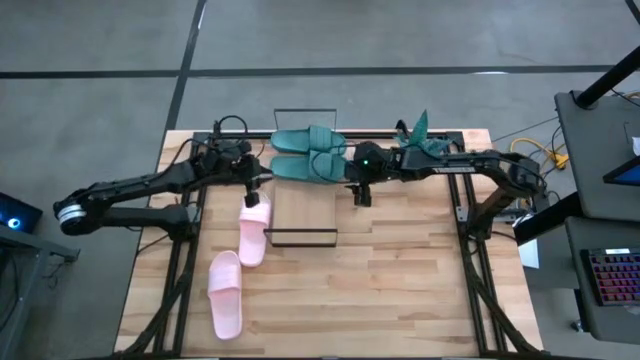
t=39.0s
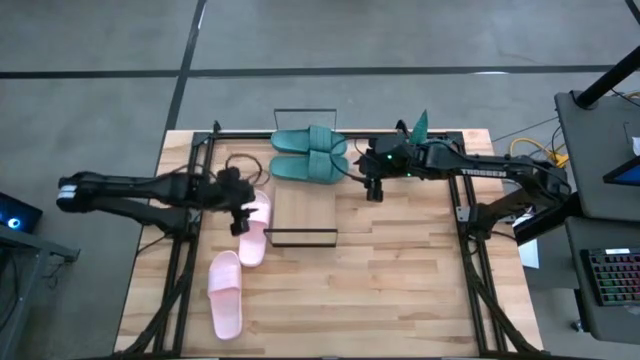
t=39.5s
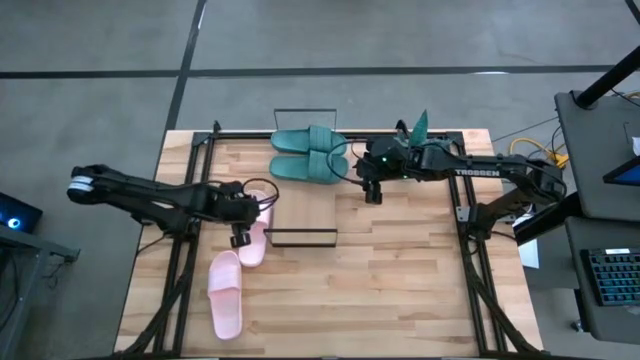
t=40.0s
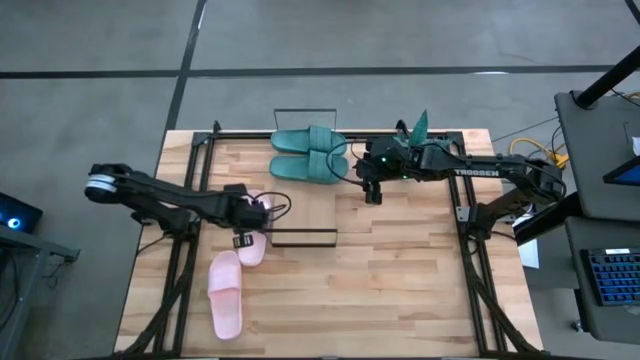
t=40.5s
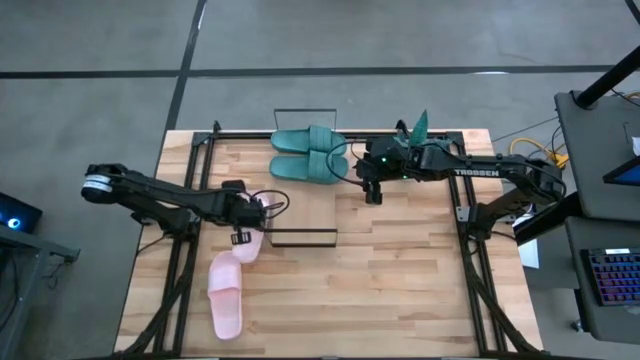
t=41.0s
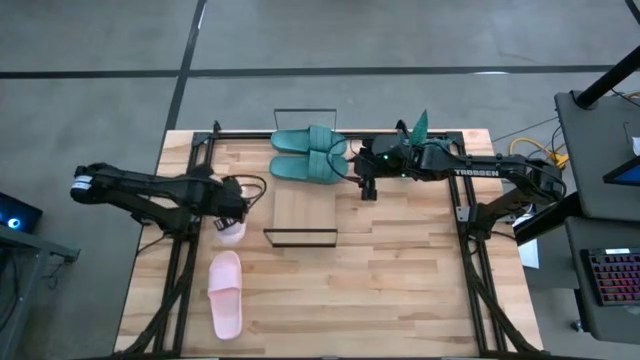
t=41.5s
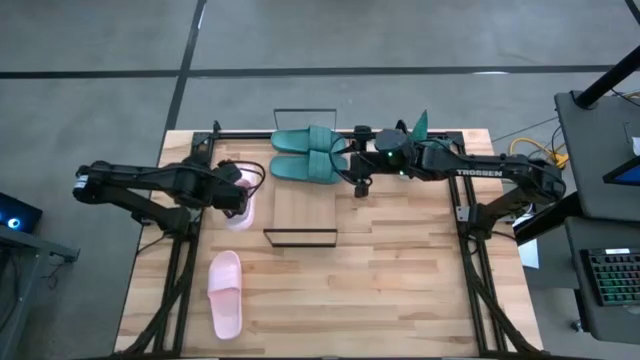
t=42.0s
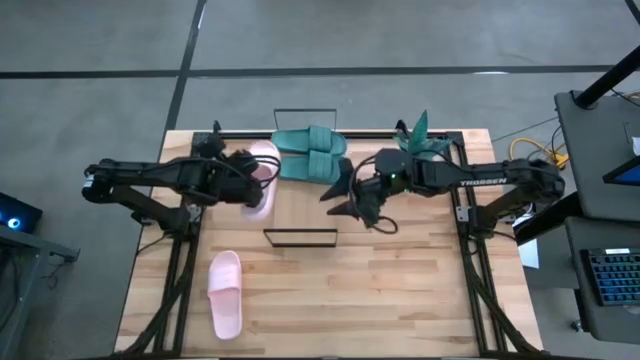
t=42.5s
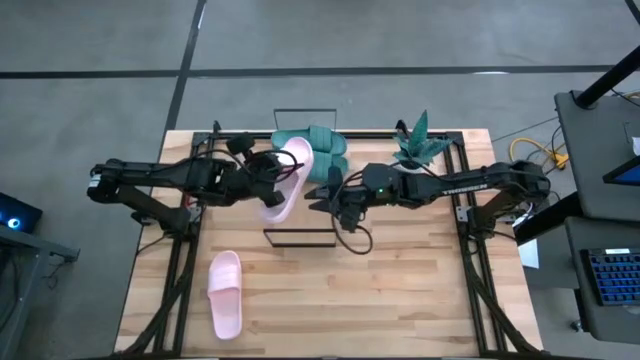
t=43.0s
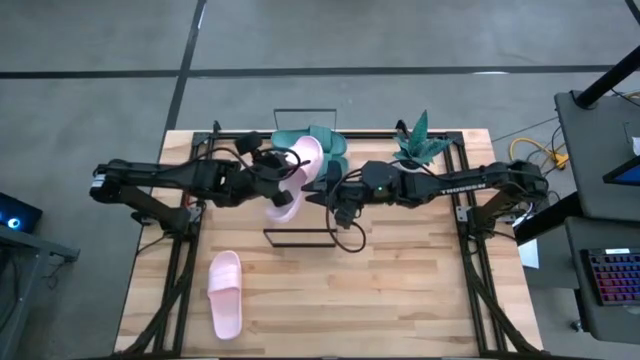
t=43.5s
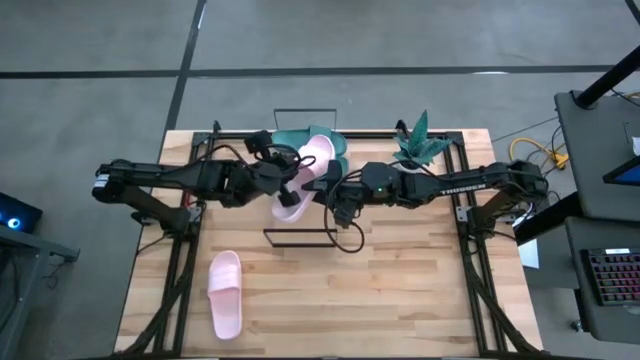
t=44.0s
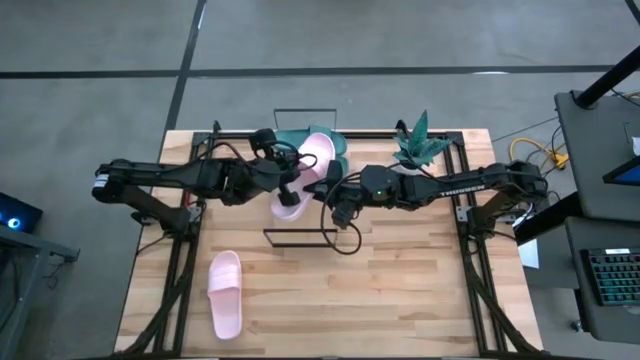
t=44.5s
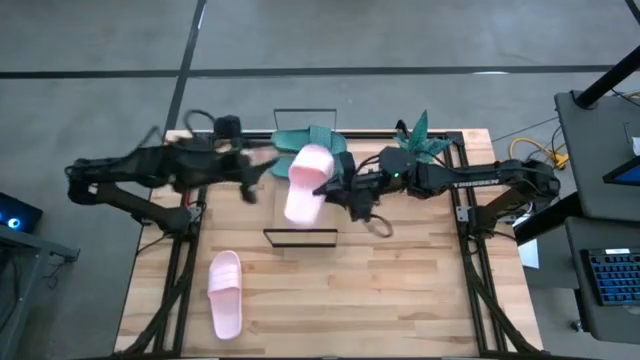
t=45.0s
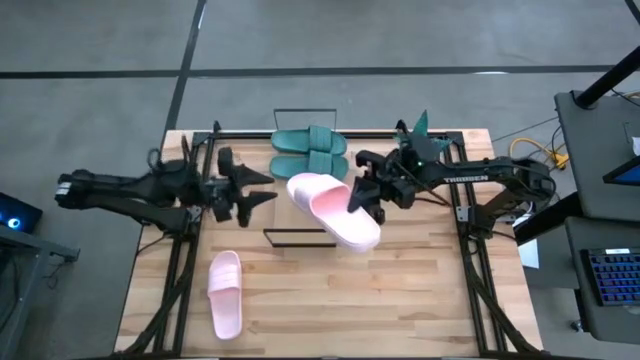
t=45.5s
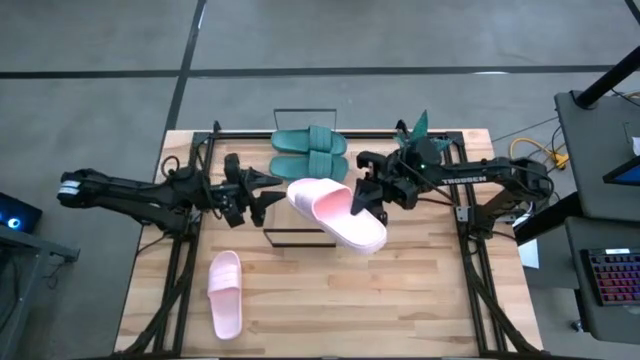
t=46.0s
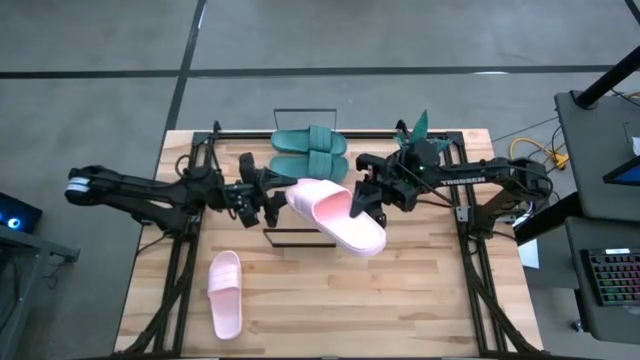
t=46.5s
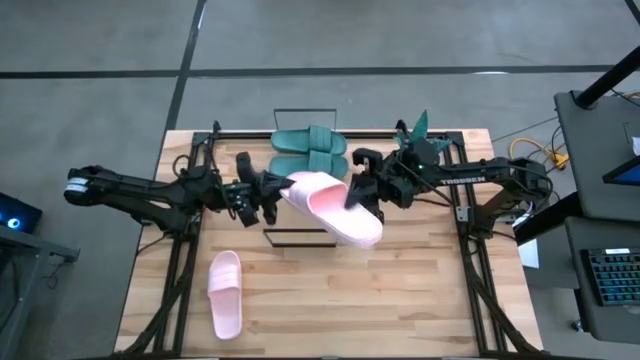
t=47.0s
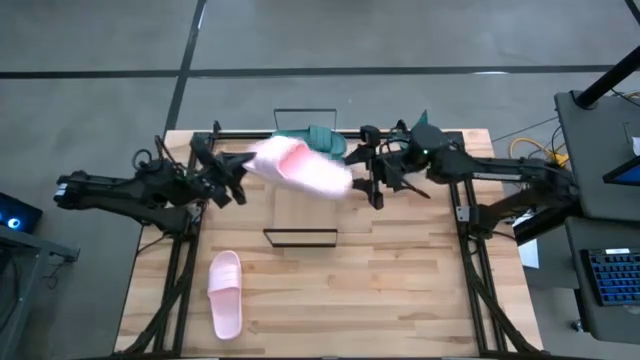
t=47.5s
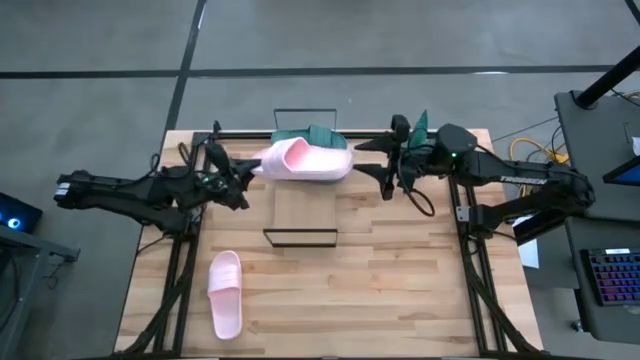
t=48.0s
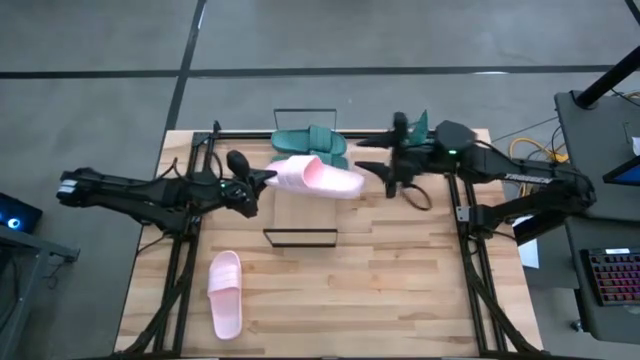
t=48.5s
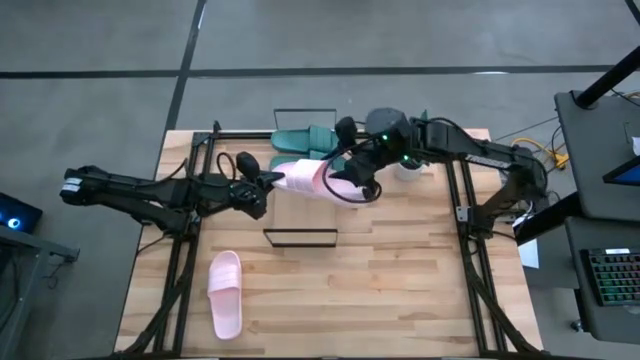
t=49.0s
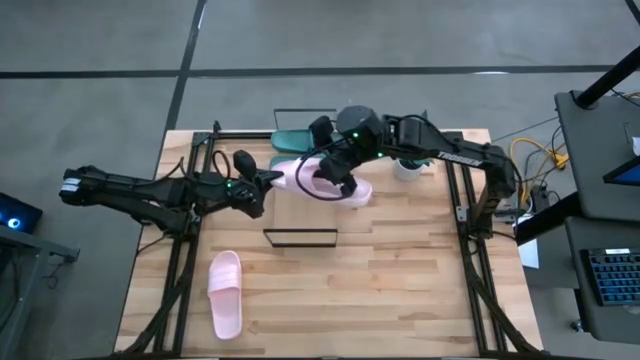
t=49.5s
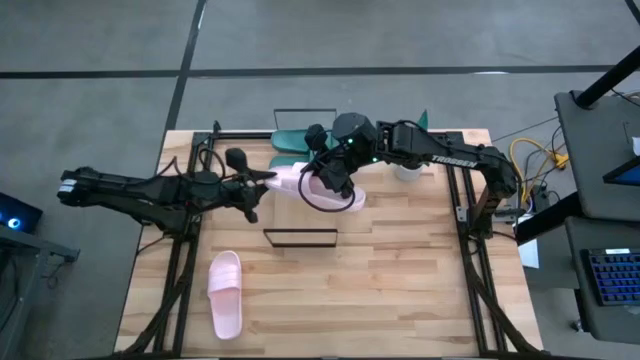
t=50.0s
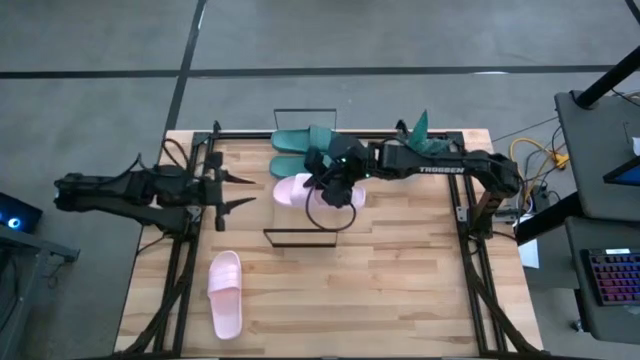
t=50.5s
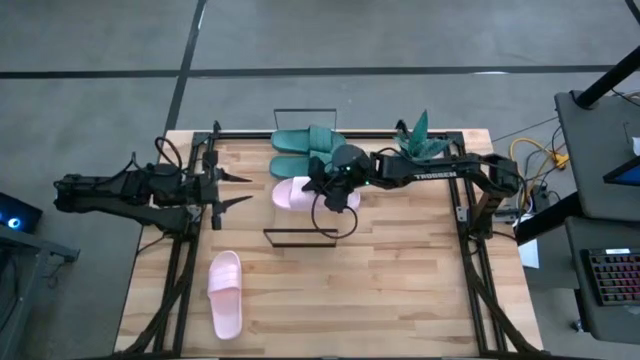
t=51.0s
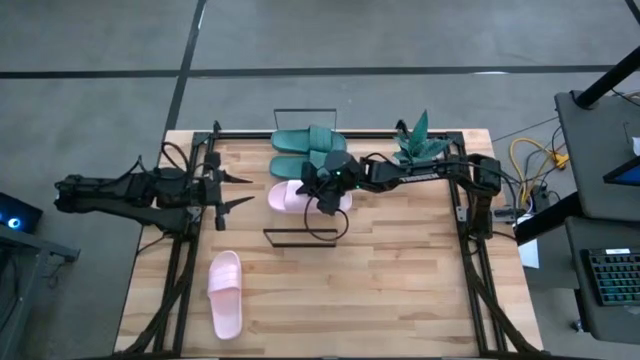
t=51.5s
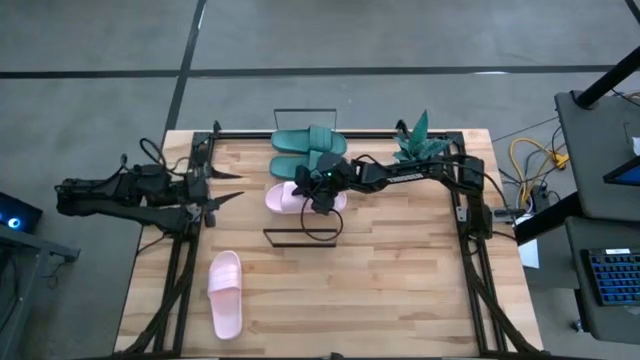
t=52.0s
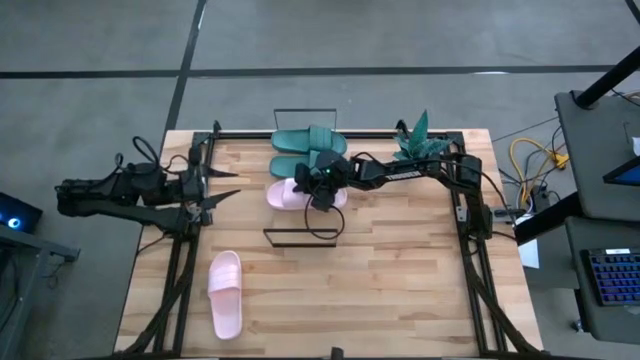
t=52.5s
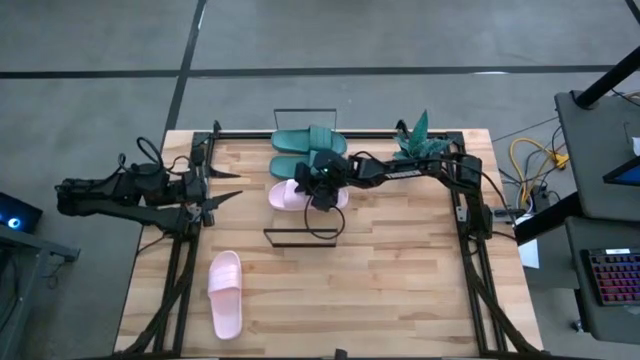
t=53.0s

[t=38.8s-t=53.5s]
Task: Pick and place slides into the shelf
Put the top pink slides on the shelf

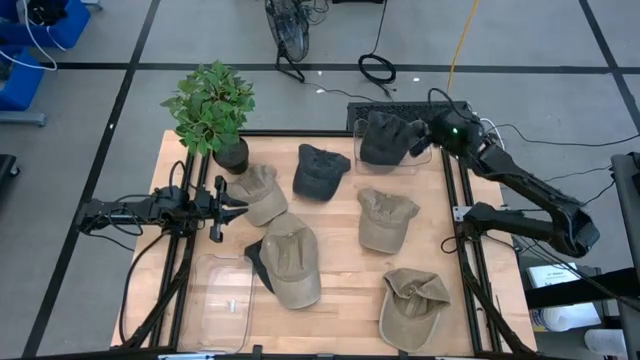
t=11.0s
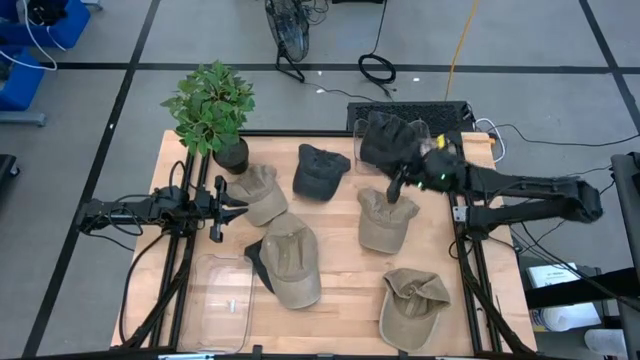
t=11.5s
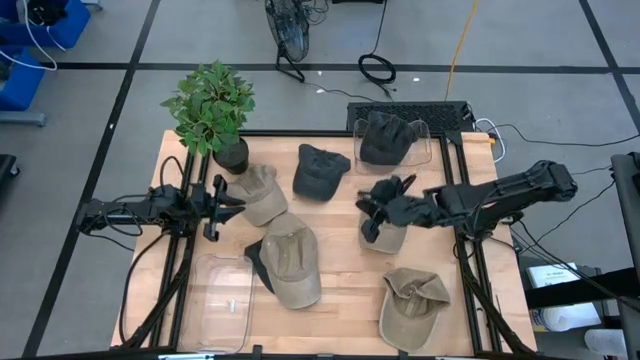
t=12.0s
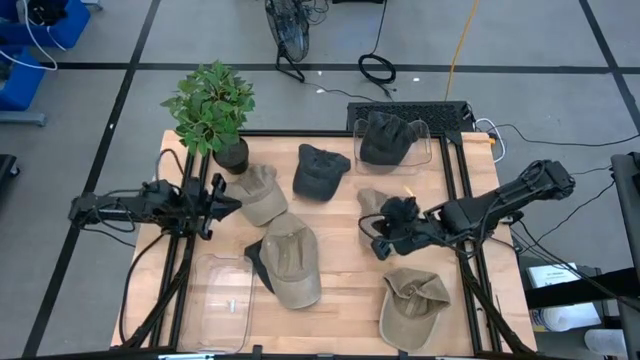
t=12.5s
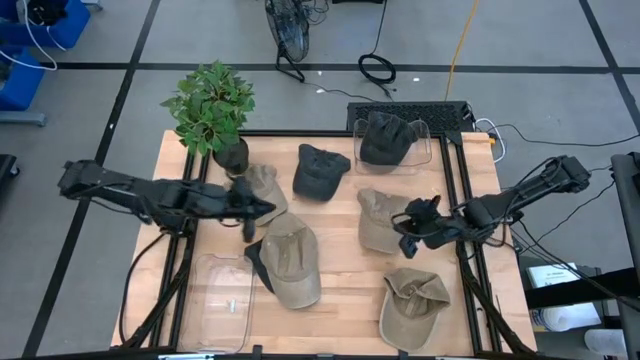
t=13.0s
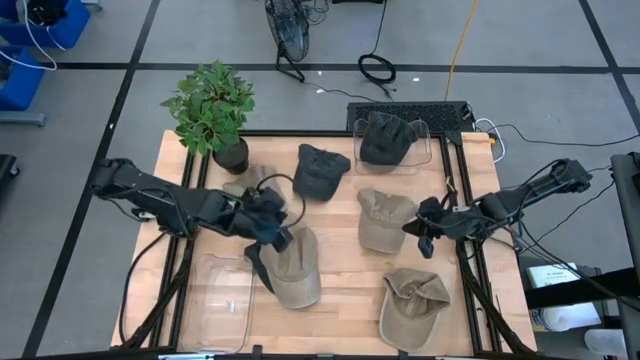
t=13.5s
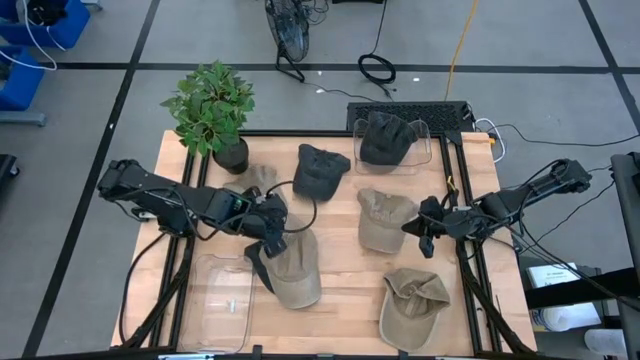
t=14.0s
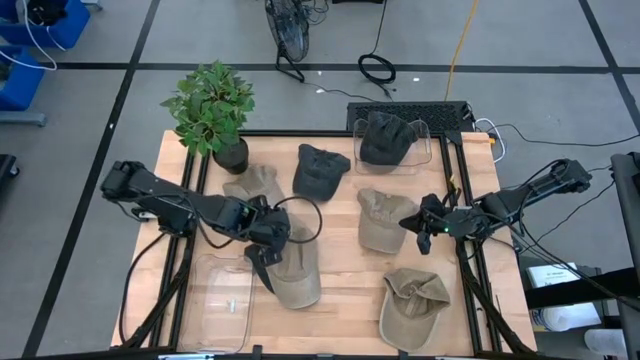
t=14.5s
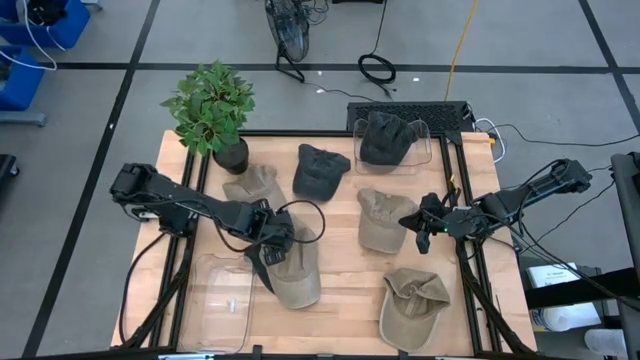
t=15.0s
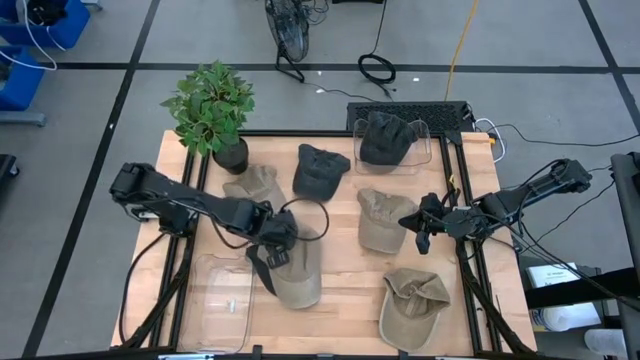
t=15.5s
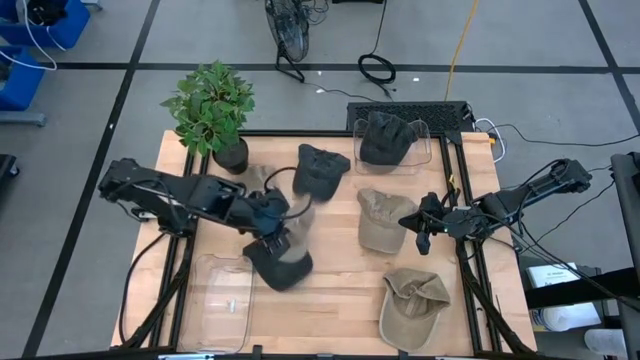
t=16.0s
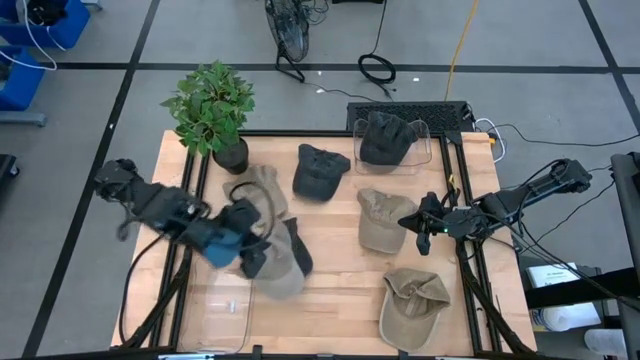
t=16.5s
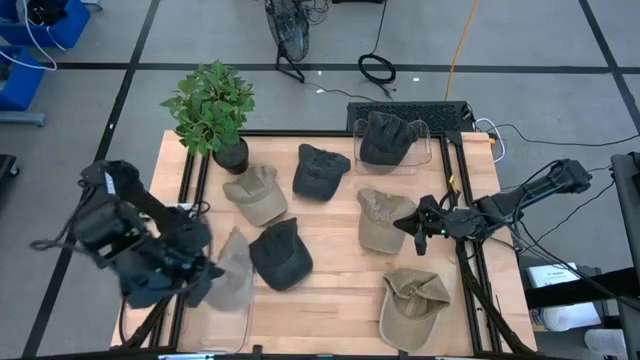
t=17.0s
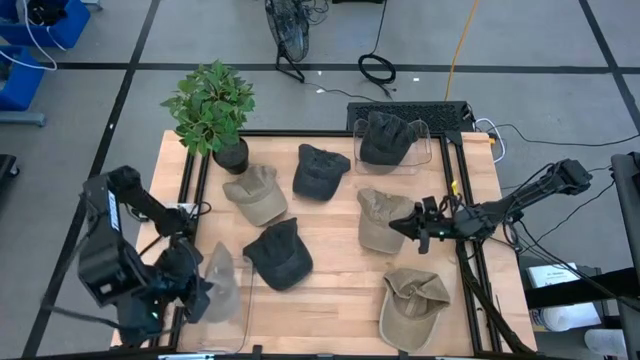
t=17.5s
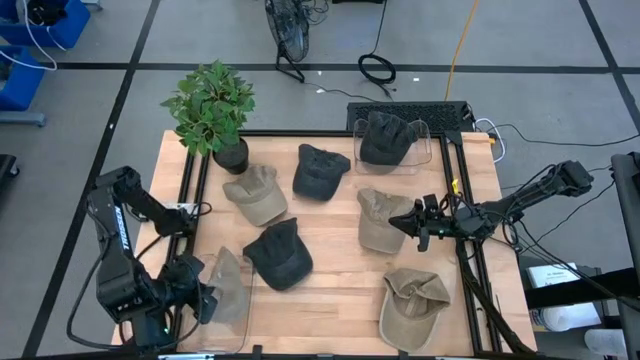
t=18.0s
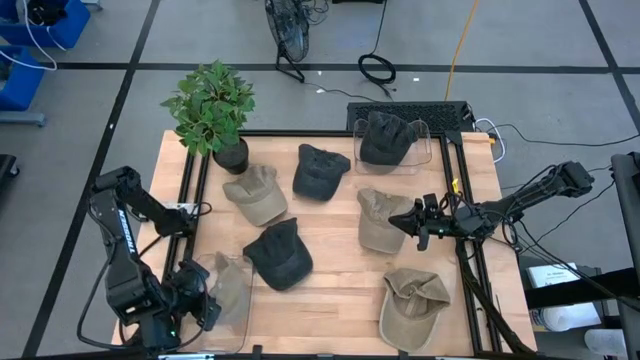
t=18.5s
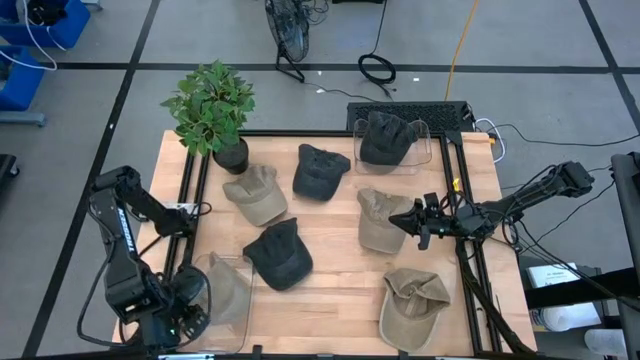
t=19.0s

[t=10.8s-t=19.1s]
Task: Pick & Place hat
Put the brown cap into the bottom transparent bin
